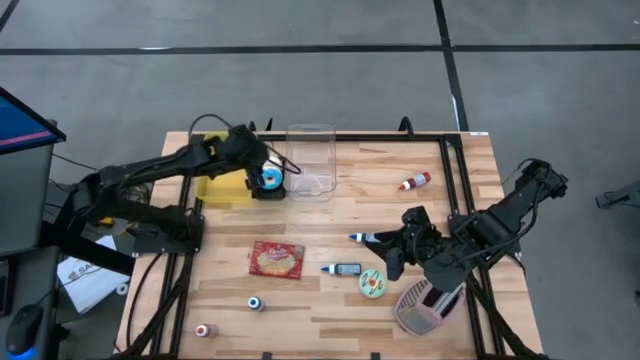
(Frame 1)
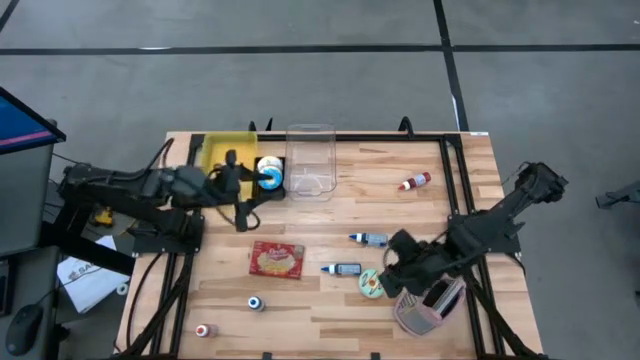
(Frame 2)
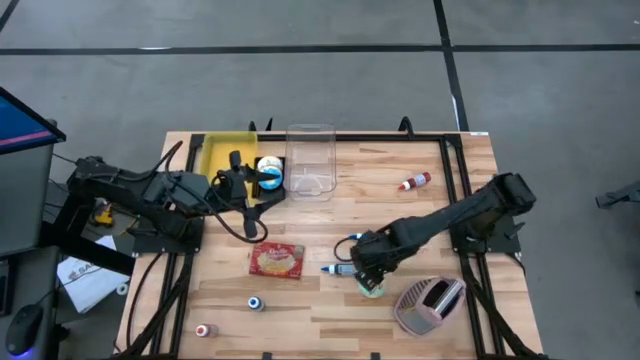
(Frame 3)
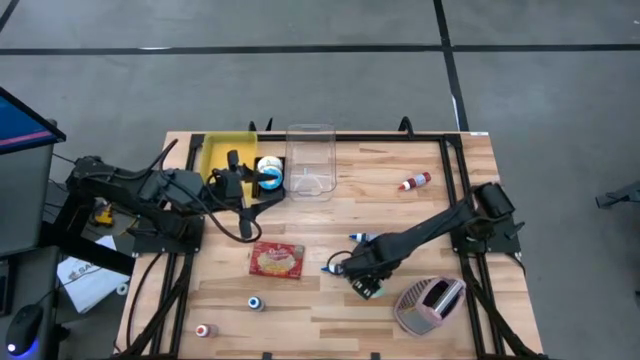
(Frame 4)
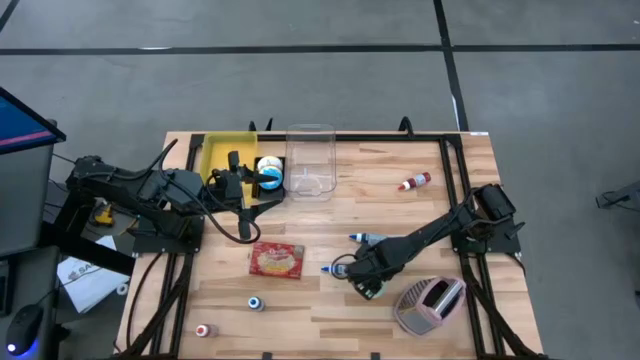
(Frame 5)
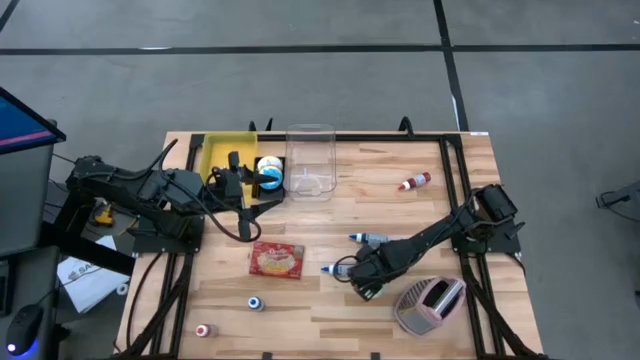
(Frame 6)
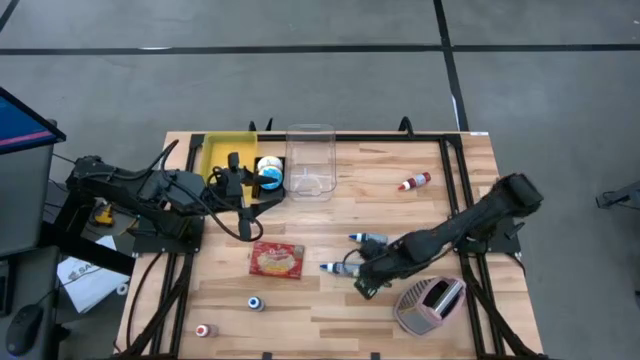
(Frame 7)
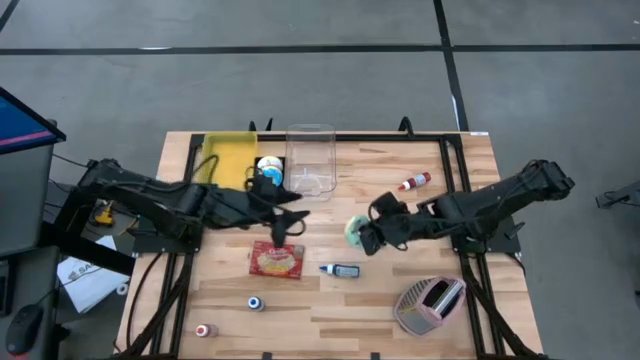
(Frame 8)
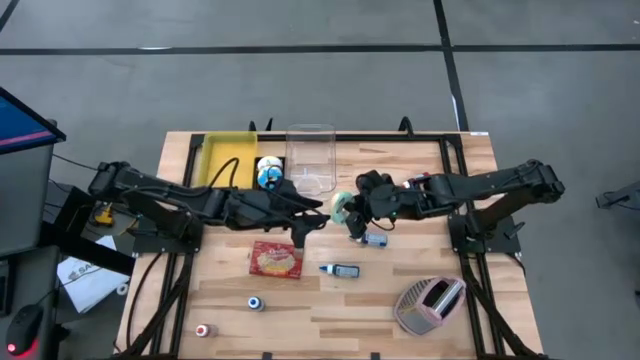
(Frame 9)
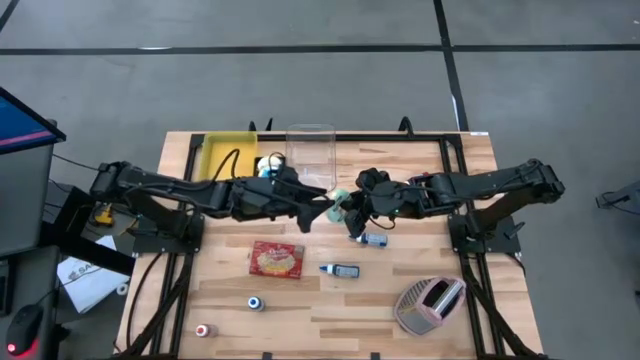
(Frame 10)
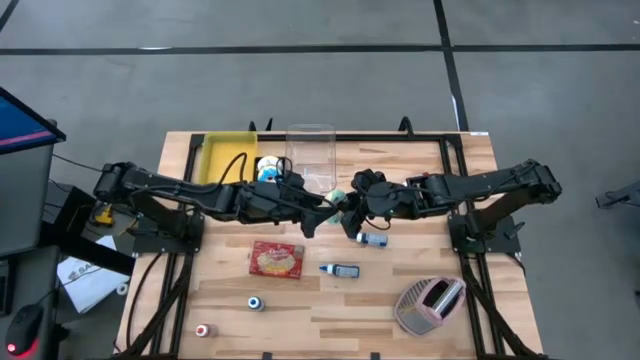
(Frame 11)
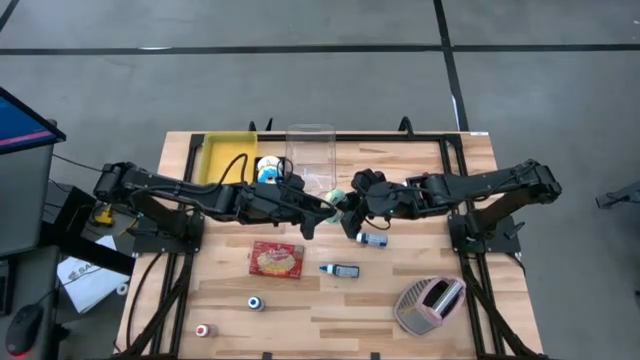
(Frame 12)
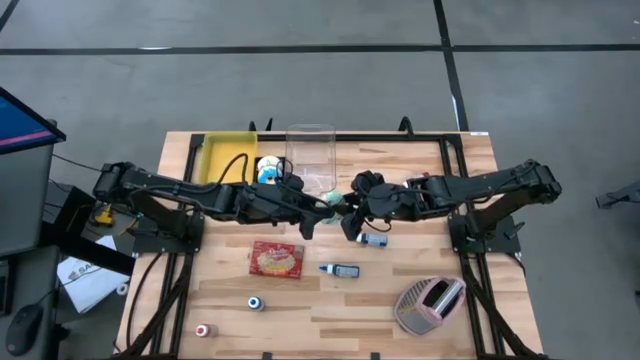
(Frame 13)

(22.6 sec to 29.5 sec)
Put the green doughnut into the black bin

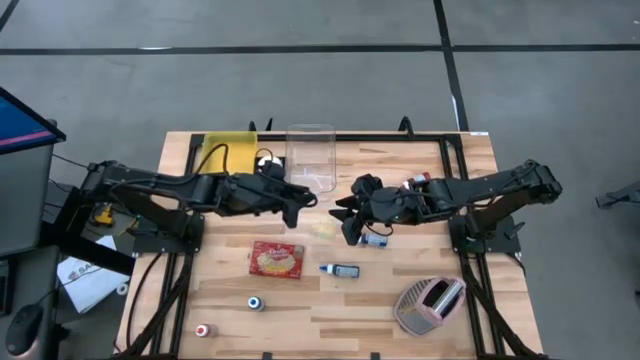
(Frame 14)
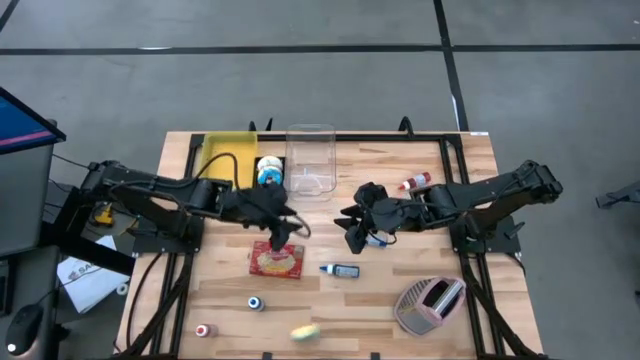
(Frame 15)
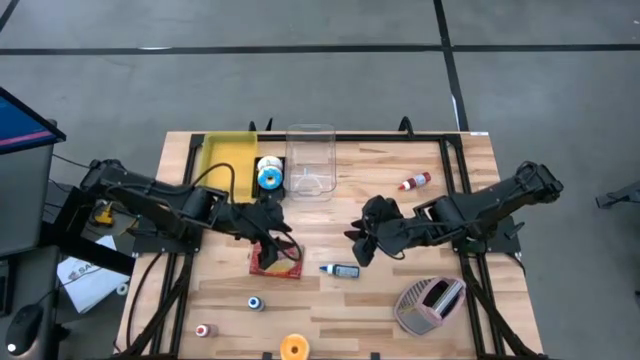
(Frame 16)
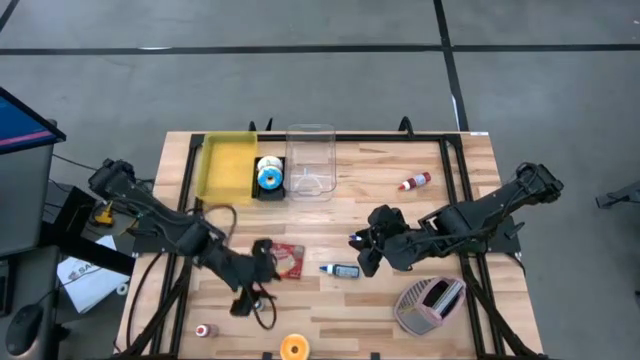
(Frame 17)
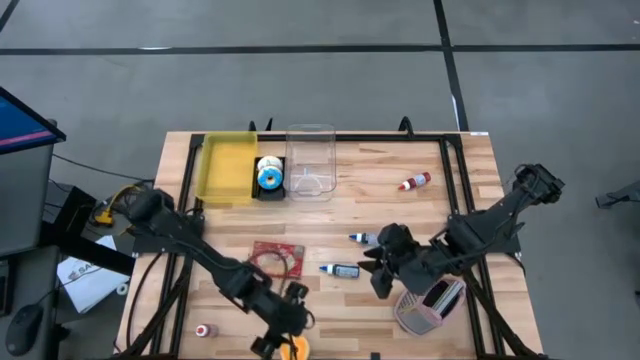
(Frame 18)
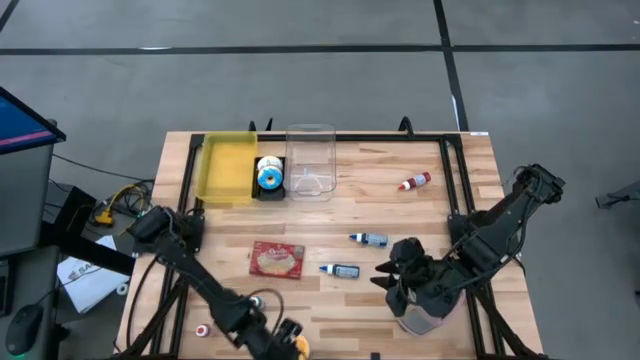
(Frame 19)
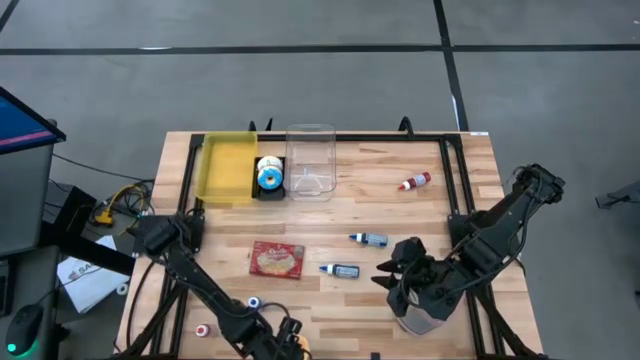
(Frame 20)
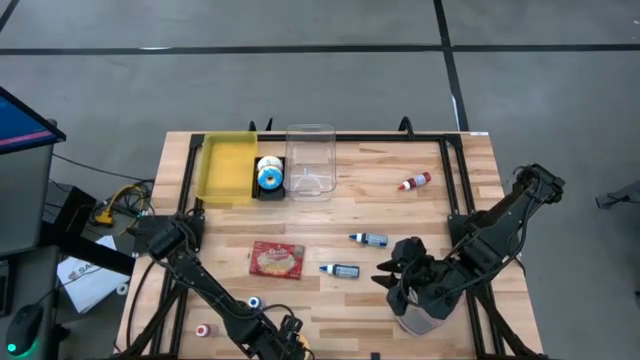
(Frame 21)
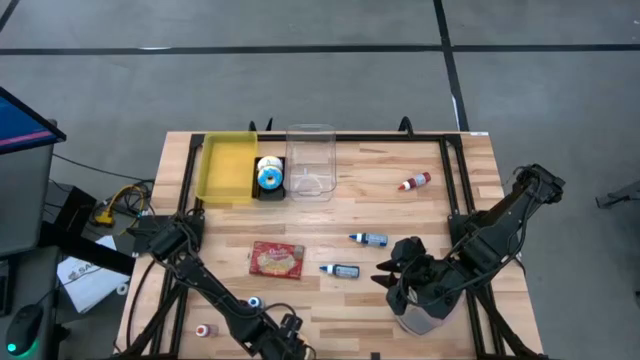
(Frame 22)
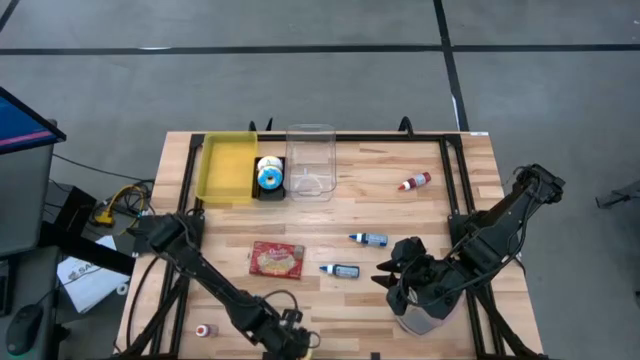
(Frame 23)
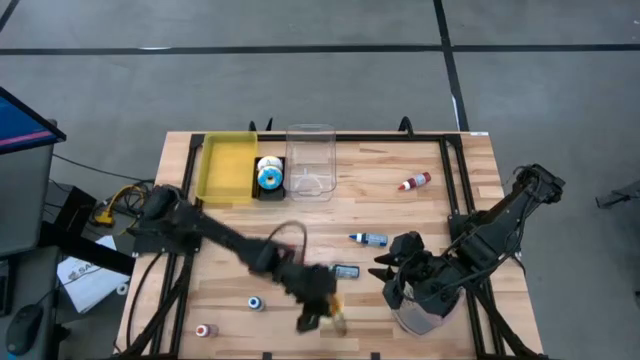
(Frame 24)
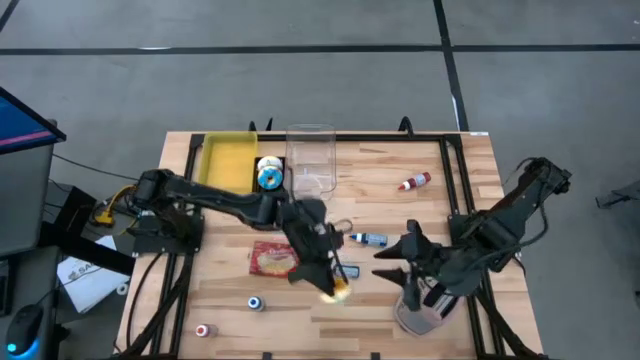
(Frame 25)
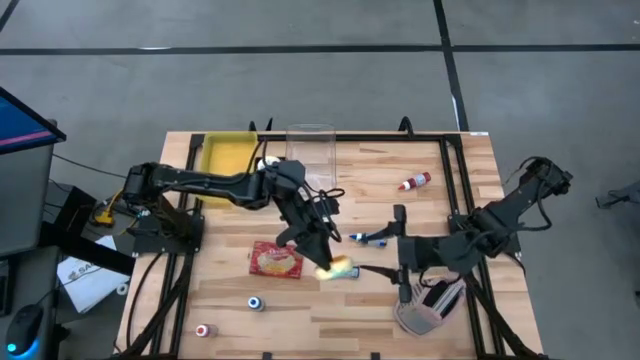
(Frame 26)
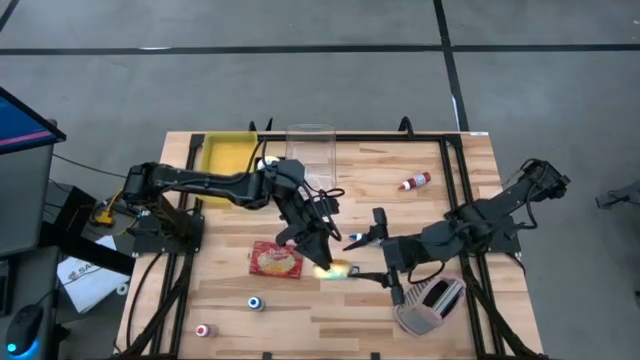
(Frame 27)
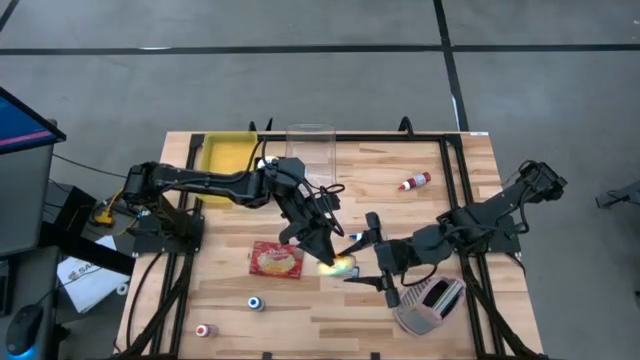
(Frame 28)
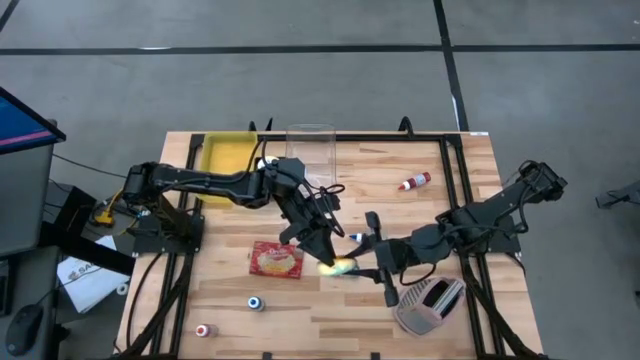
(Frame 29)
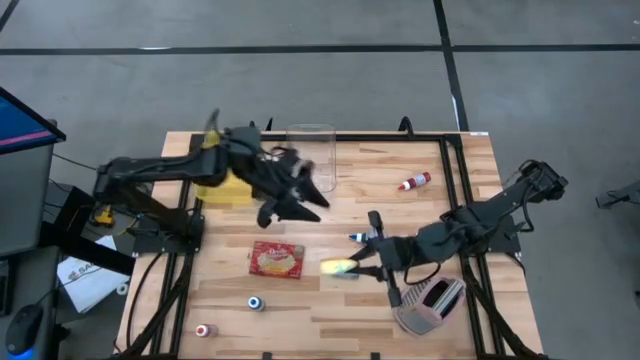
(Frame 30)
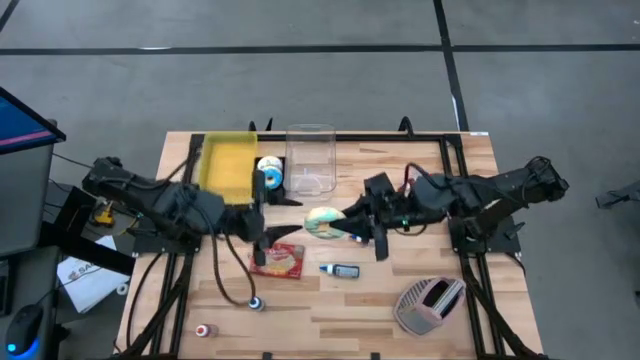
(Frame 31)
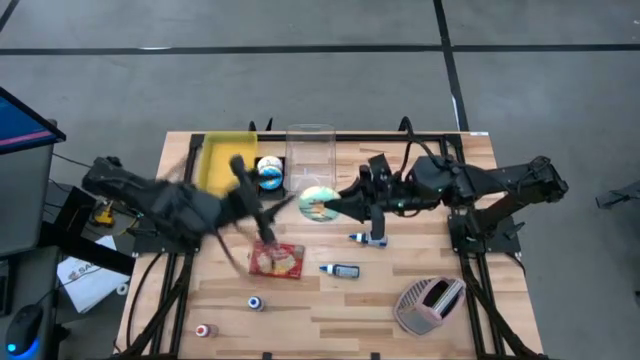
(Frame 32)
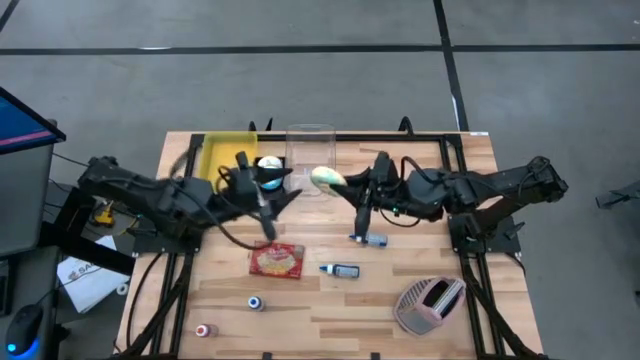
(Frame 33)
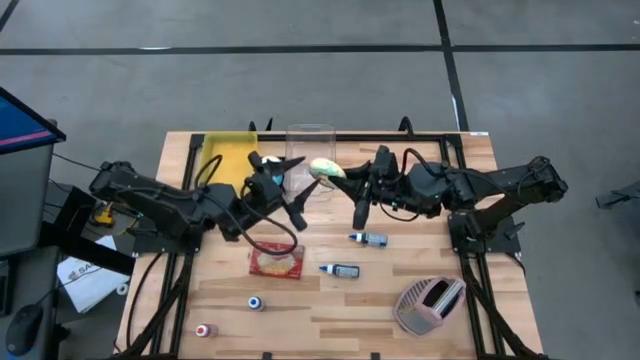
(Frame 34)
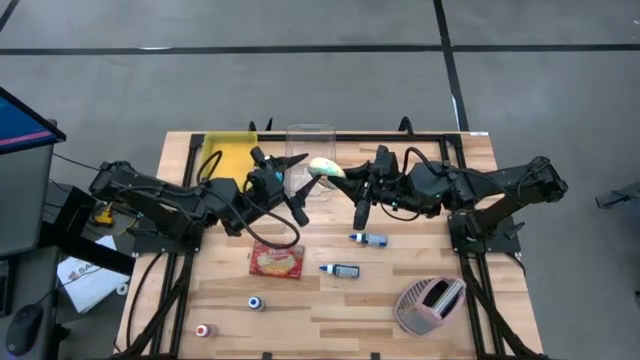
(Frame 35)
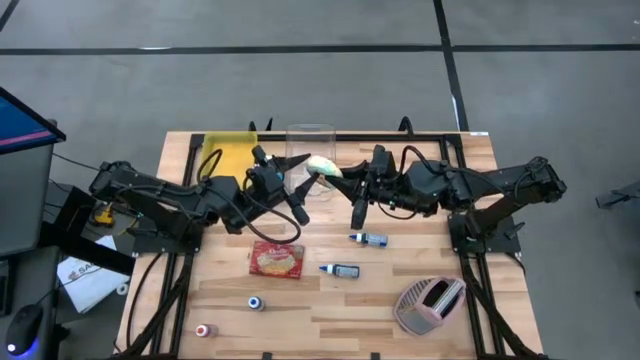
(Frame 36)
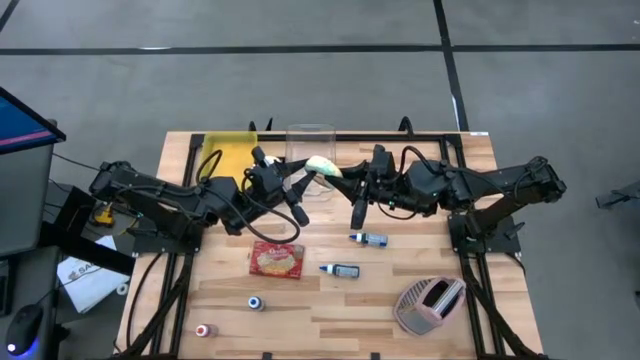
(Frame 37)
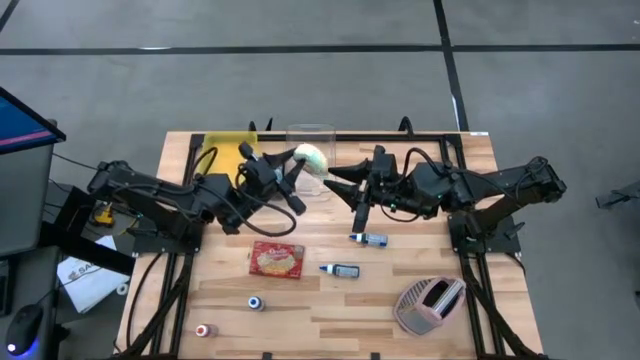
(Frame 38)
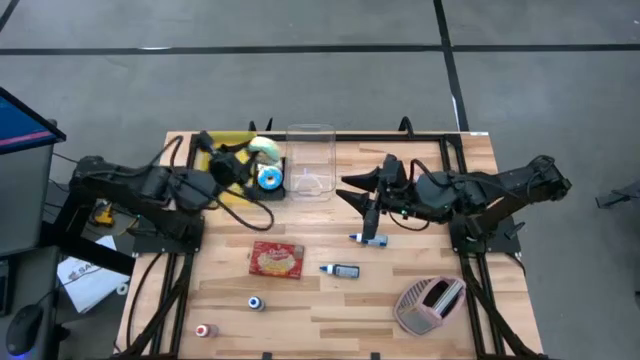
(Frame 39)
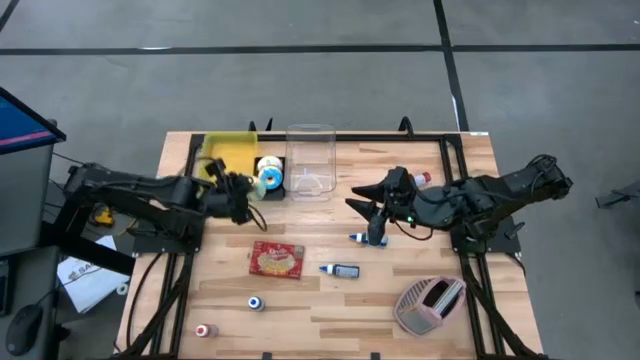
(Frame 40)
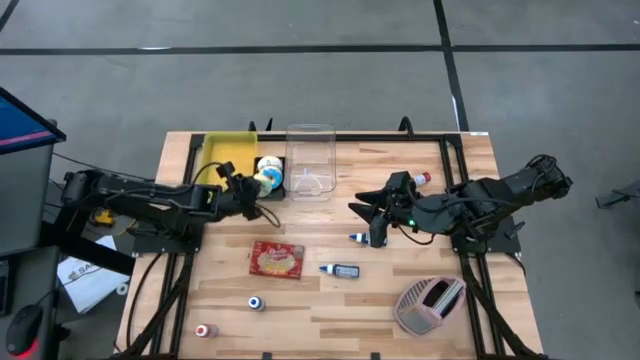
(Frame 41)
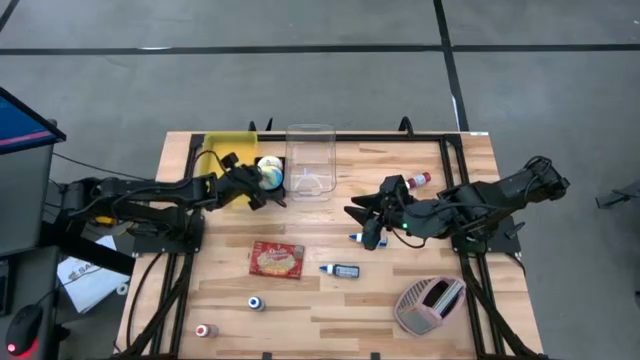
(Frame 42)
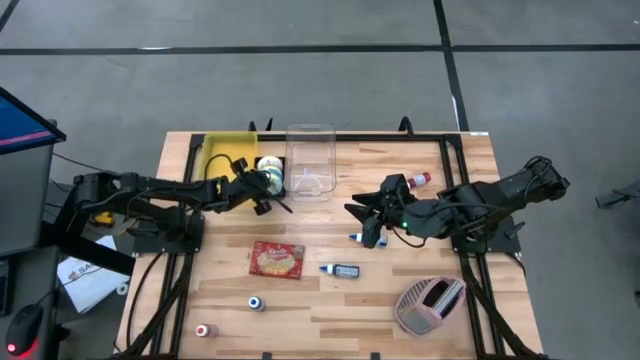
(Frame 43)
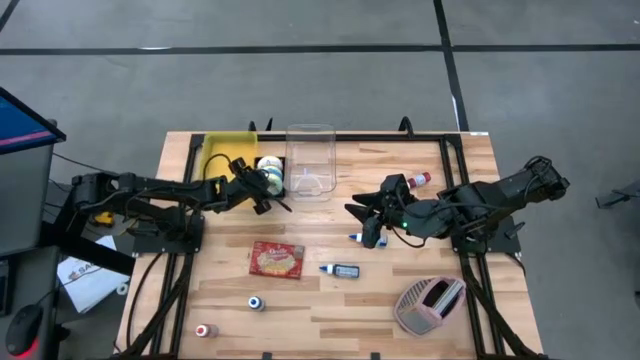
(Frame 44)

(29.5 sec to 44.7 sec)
Put the green doughnut into the black bin
